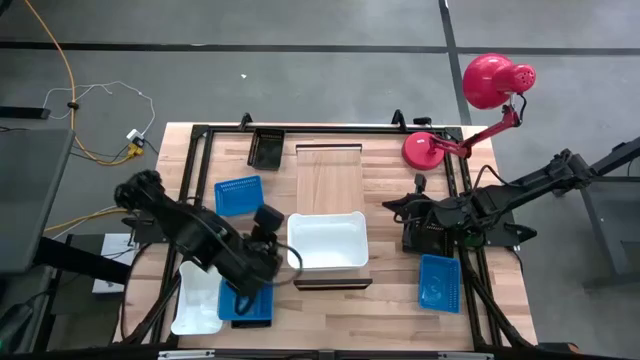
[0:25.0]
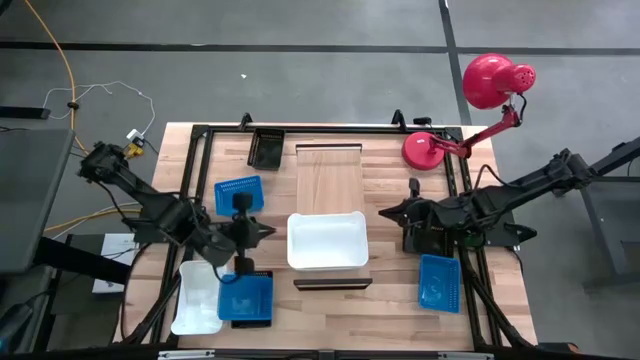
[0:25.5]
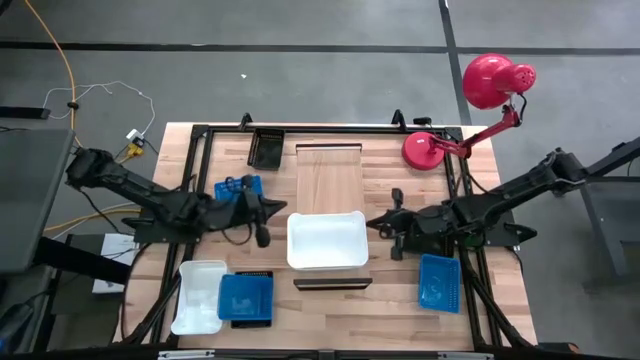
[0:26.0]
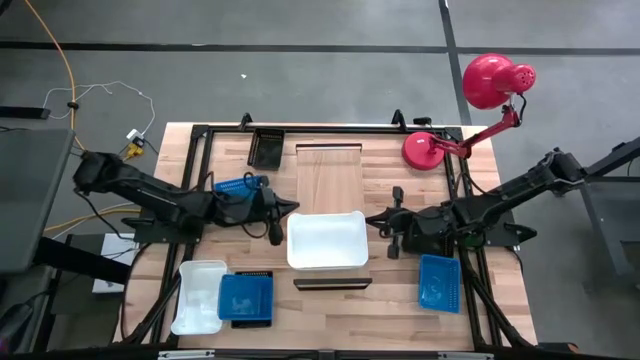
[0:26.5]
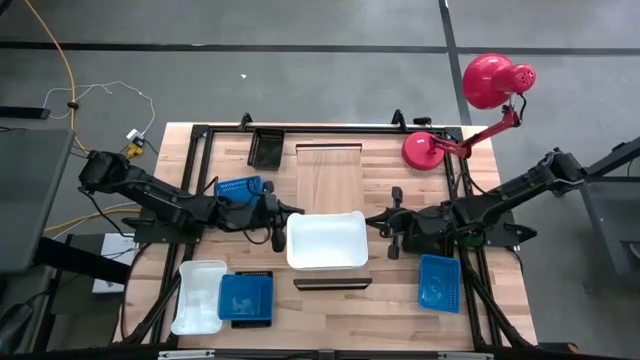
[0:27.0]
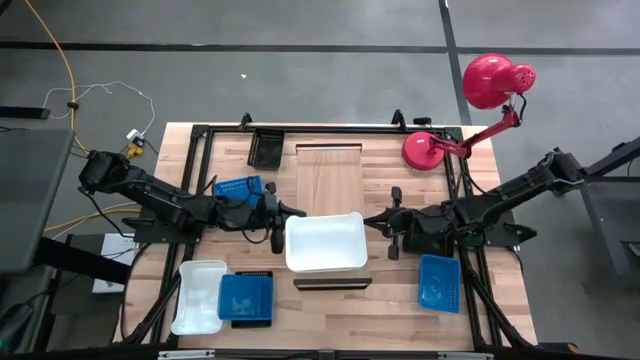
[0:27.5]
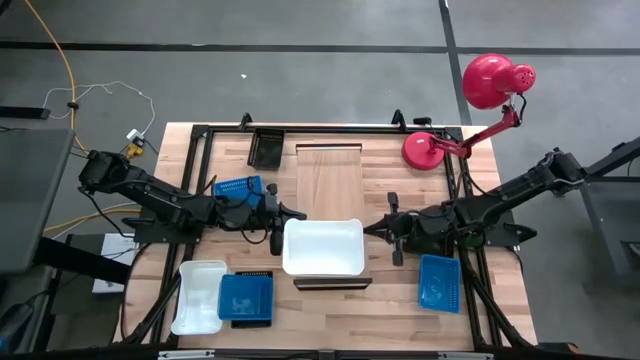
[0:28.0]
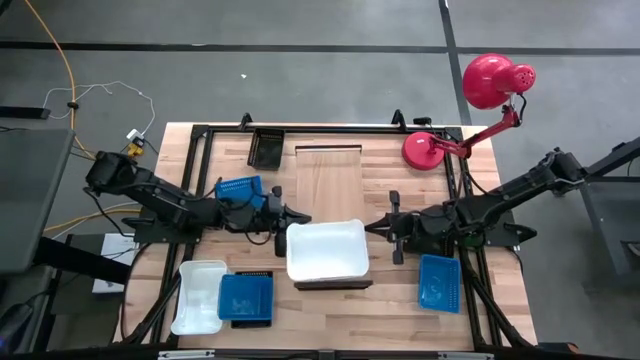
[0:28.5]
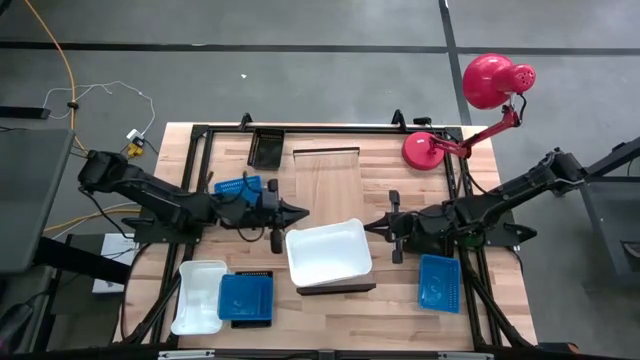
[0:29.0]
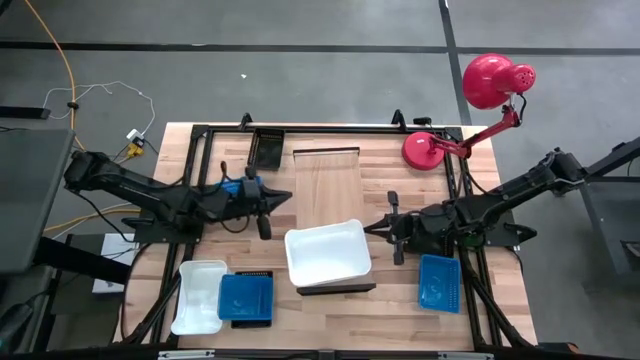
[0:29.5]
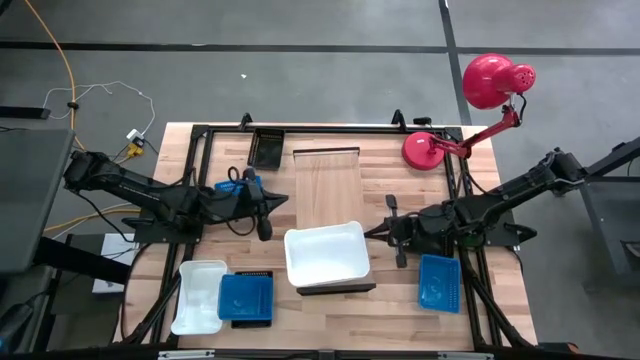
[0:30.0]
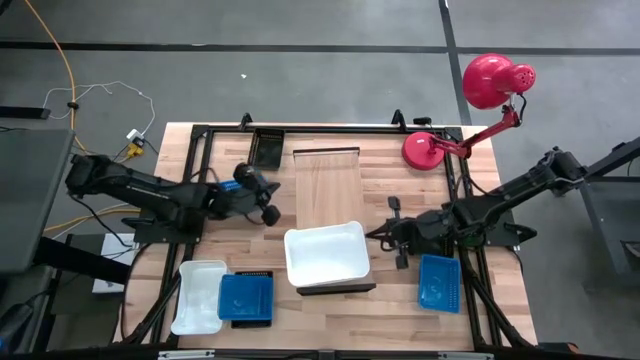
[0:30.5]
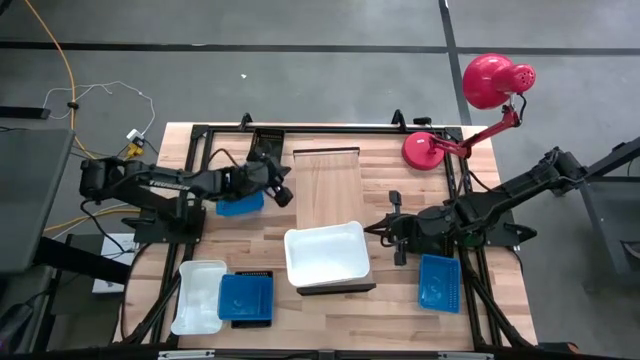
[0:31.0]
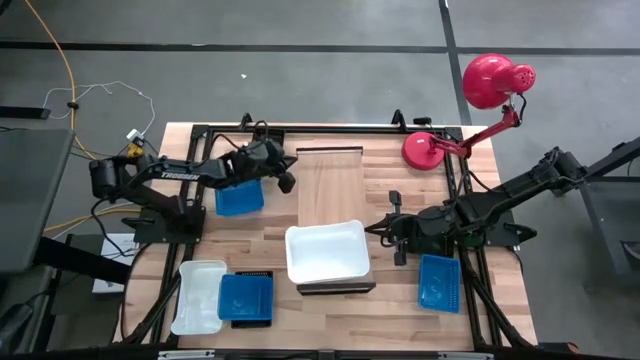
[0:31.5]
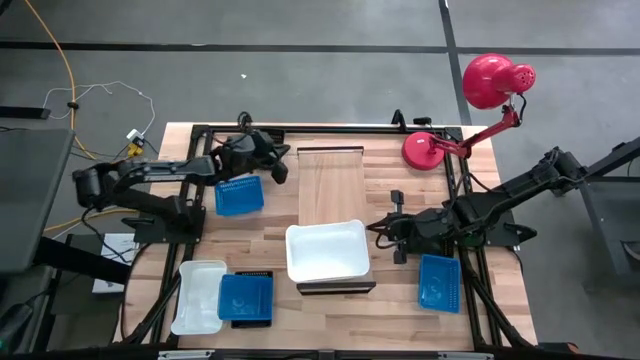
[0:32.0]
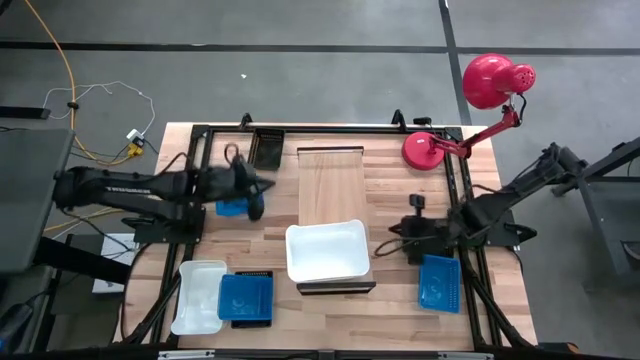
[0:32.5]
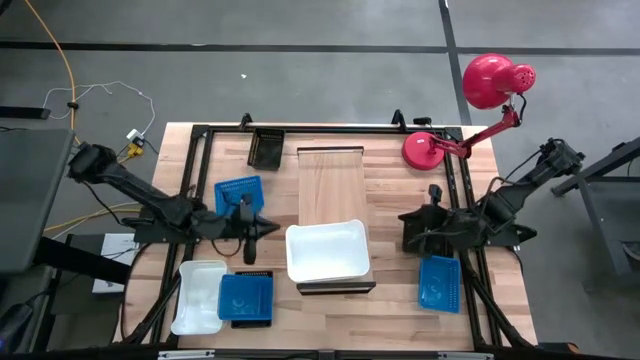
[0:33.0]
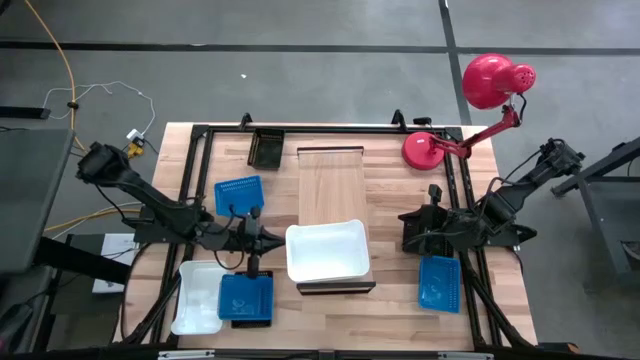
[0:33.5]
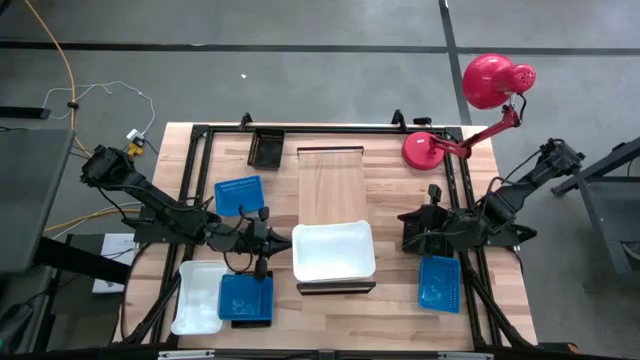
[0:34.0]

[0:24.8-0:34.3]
Task: Stack baskets on shelf by color
Adjust the white bins on the shelf

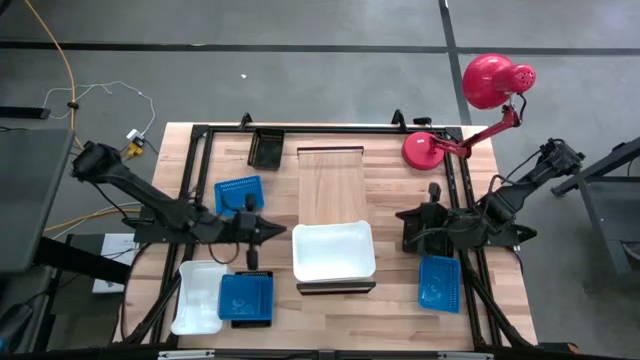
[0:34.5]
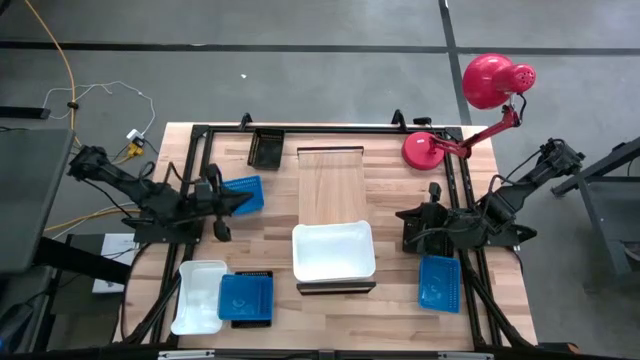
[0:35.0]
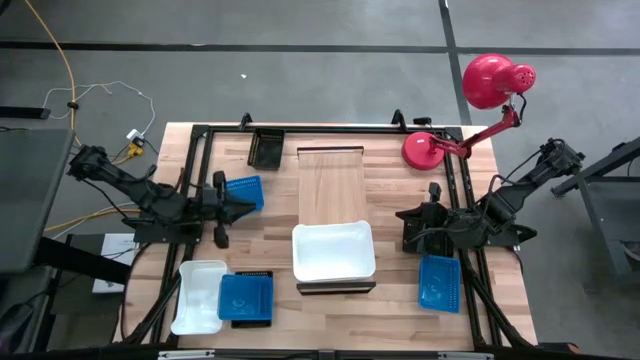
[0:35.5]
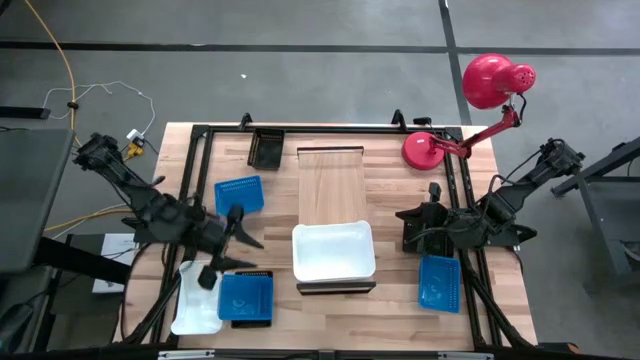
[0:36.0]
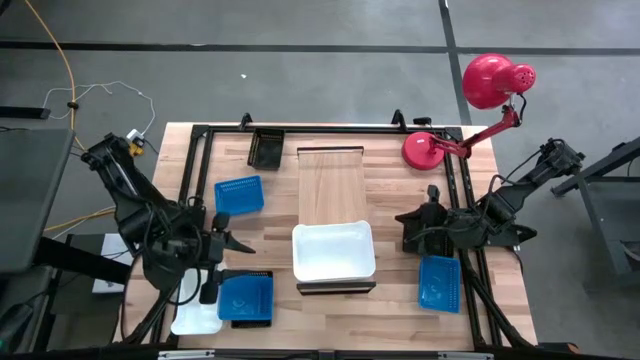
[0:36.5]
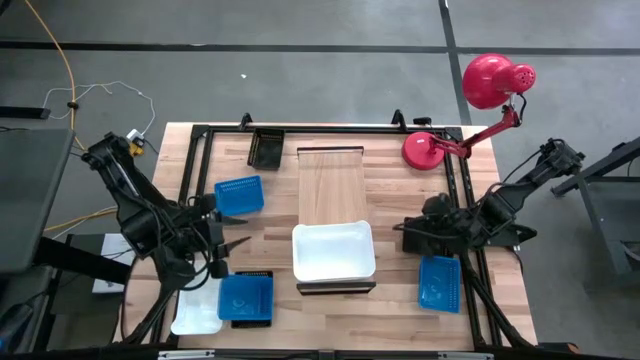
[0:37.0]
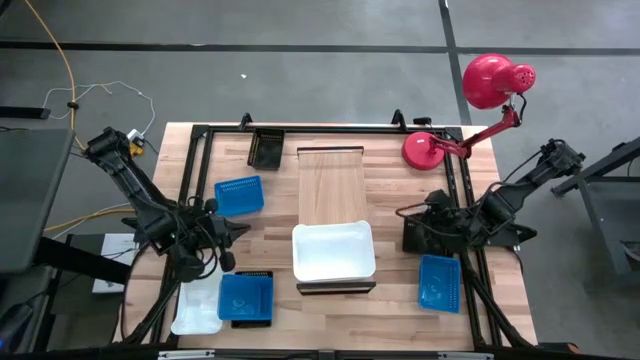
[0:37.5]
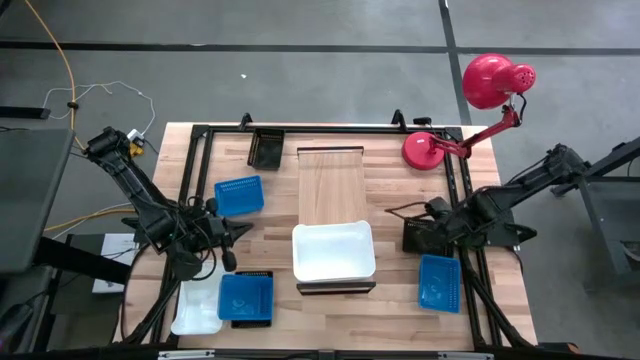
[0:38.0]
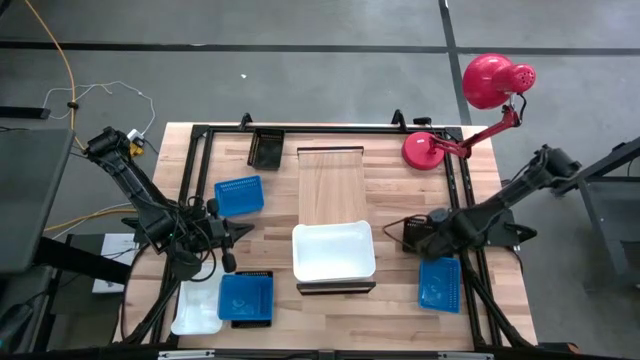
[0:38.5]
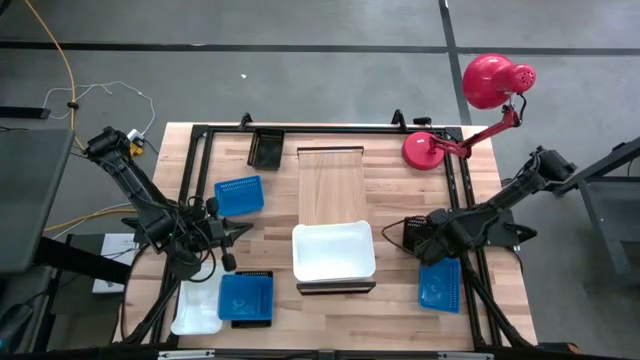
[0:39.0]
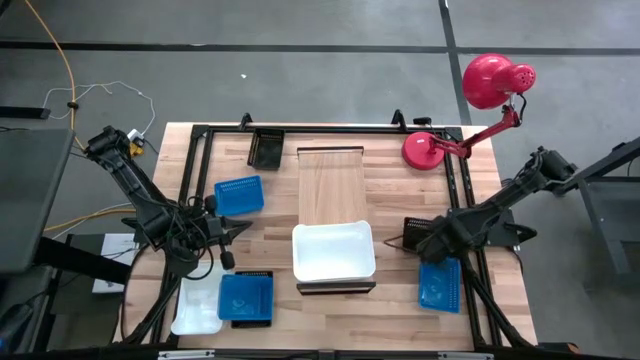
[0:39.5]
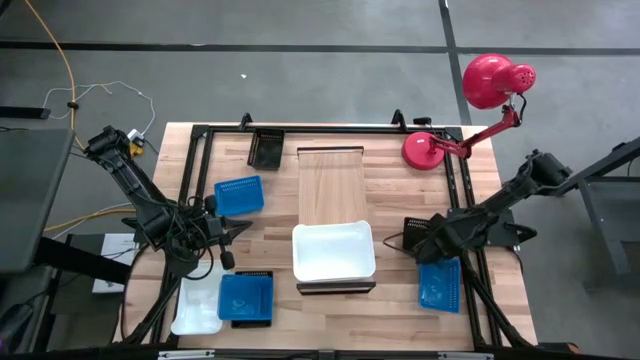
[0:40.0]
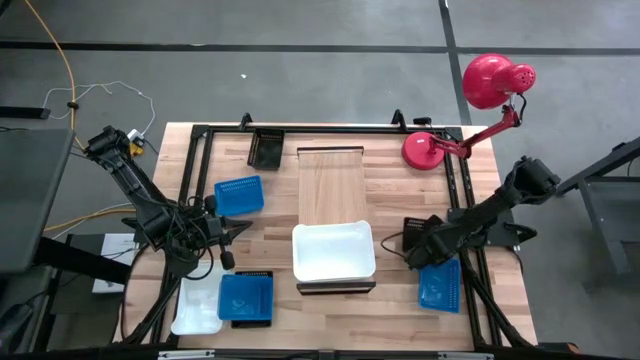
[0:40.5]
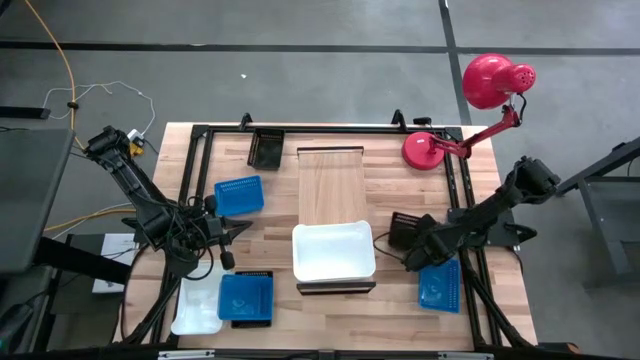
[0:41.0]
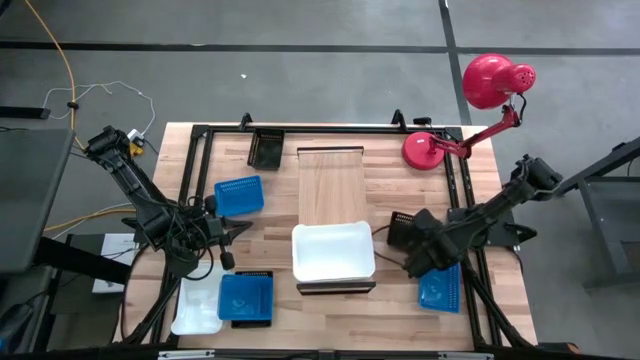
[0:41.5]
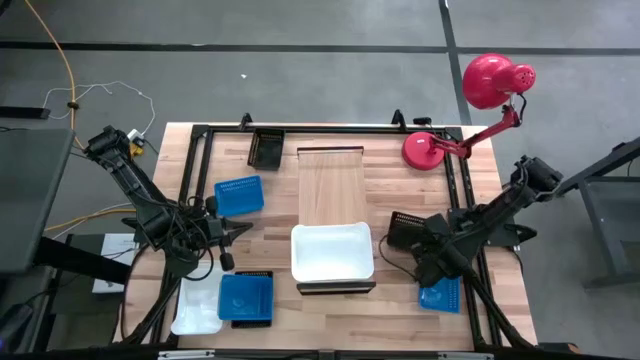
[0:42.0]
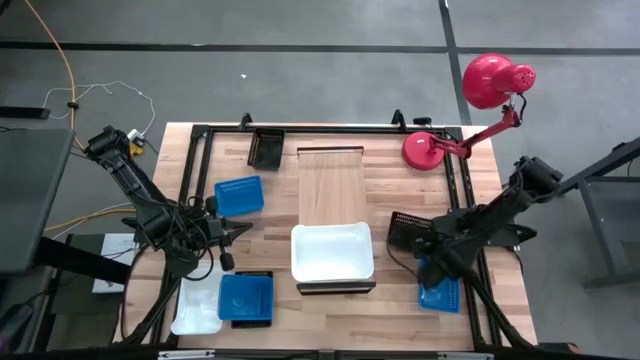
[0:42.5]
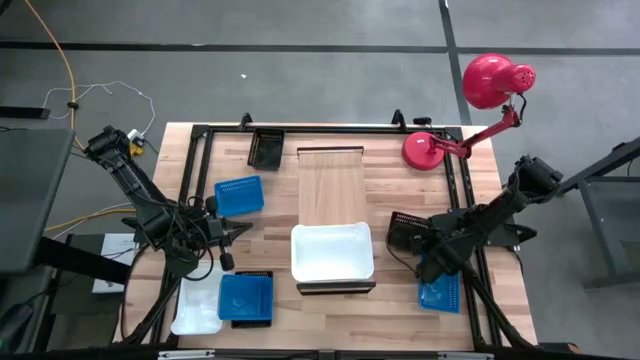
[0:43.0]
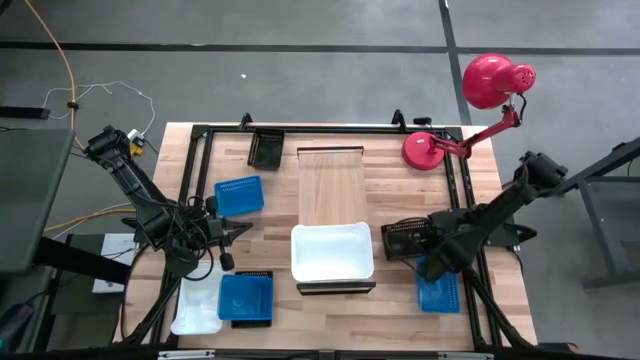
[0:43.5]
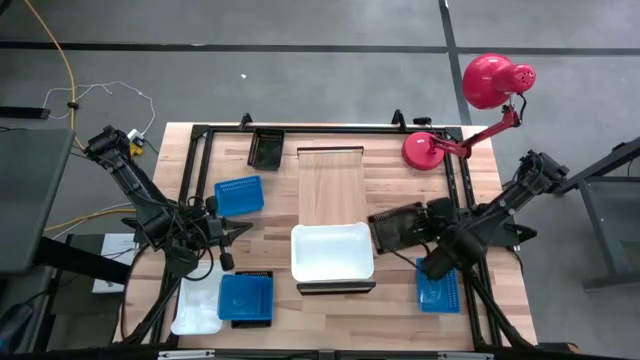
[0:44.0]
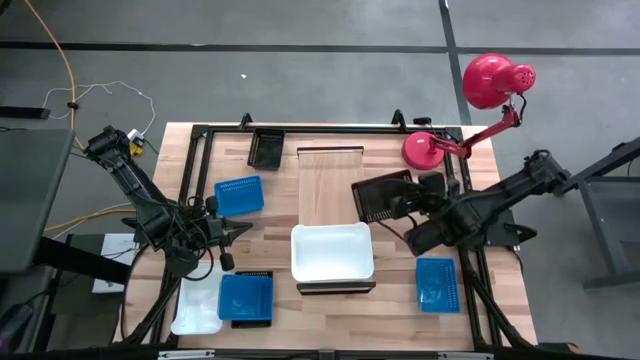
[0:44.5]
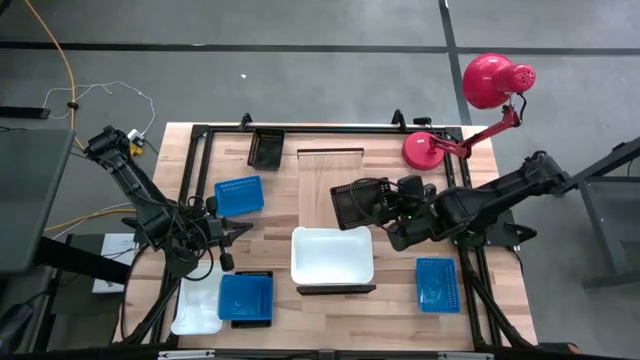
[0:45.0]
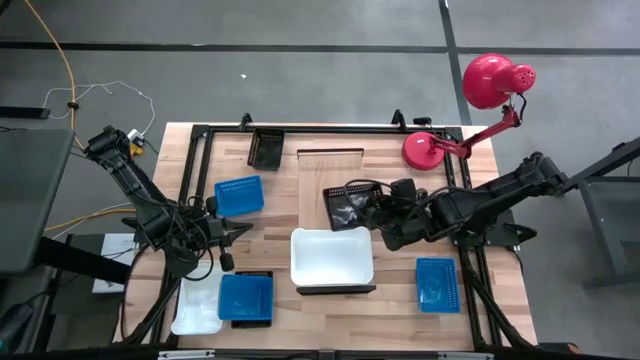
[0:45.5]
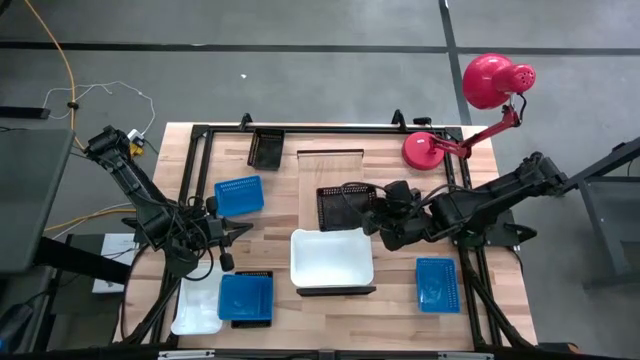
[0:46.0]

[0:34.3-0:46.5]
Put the right black bin on the shelf
